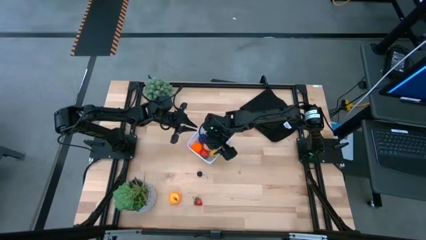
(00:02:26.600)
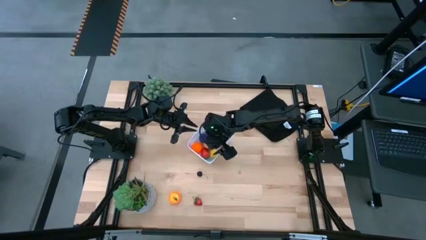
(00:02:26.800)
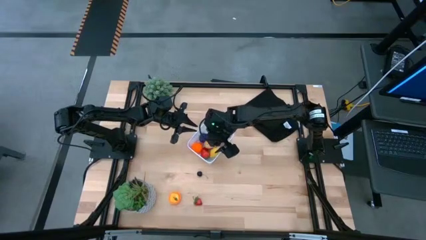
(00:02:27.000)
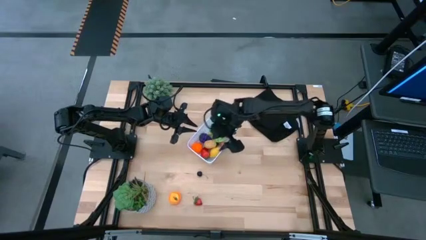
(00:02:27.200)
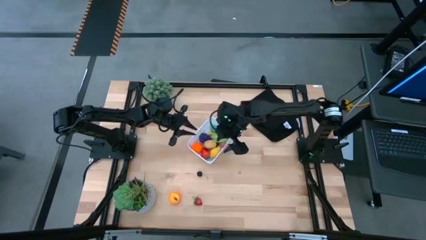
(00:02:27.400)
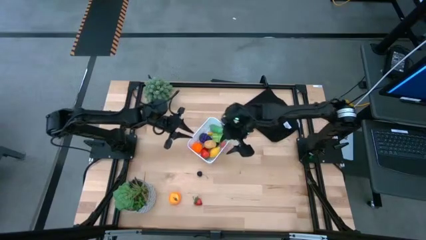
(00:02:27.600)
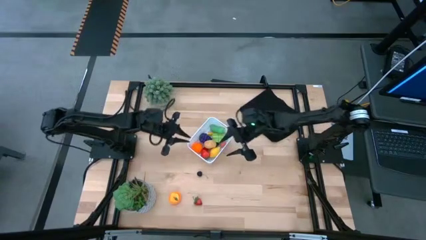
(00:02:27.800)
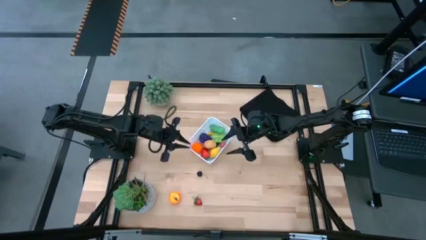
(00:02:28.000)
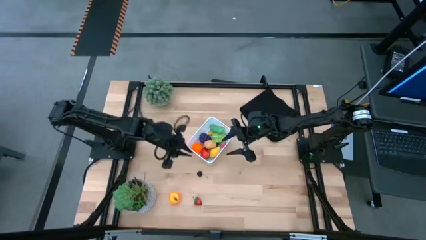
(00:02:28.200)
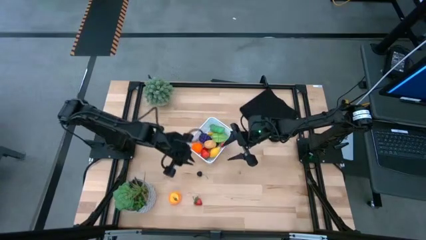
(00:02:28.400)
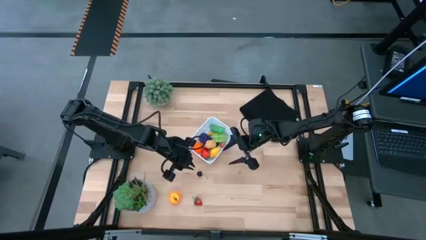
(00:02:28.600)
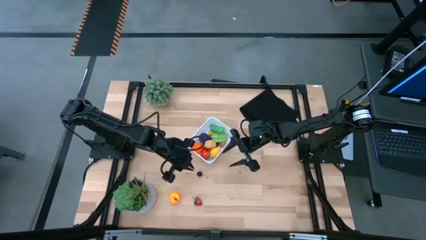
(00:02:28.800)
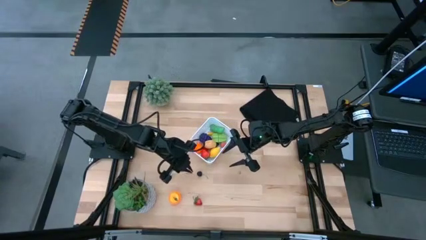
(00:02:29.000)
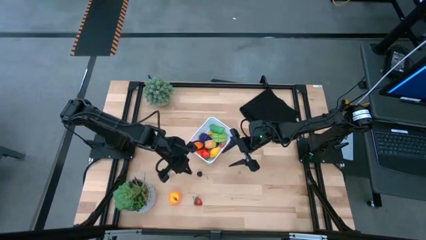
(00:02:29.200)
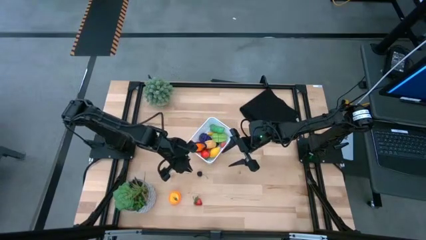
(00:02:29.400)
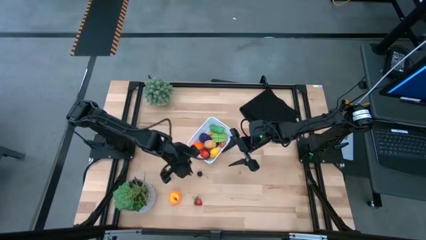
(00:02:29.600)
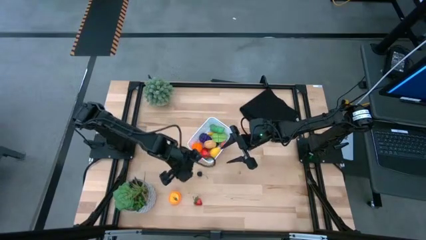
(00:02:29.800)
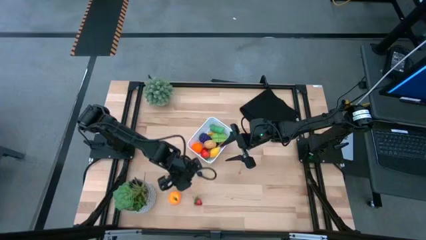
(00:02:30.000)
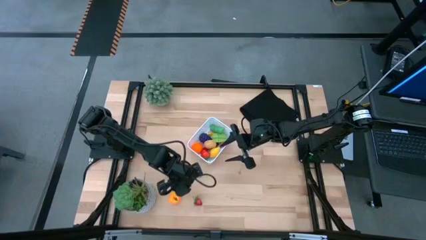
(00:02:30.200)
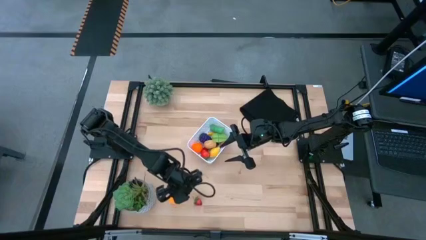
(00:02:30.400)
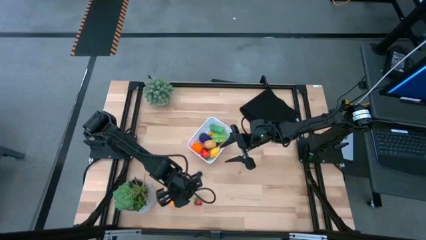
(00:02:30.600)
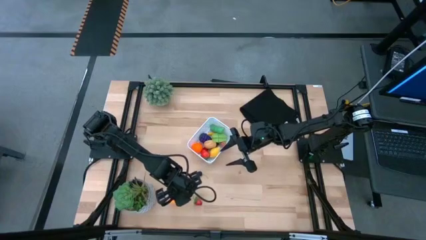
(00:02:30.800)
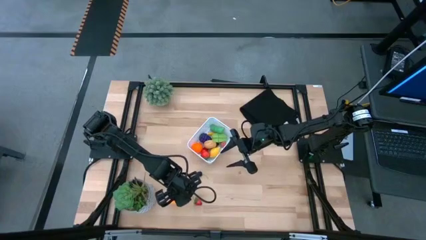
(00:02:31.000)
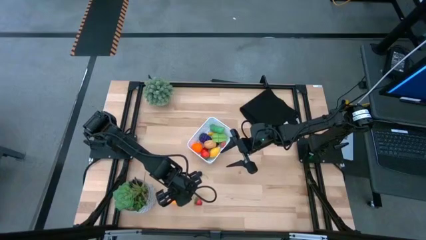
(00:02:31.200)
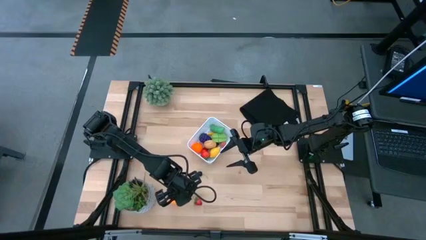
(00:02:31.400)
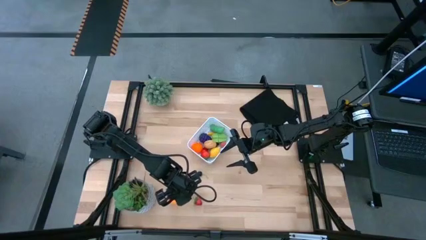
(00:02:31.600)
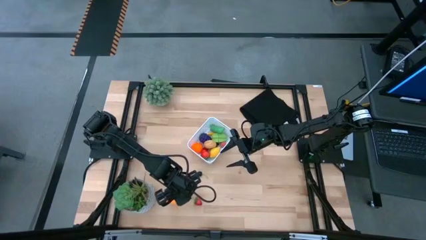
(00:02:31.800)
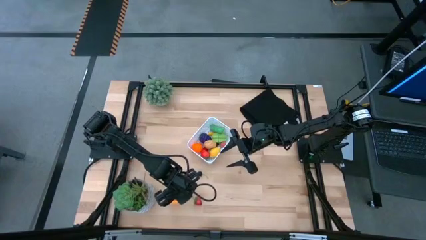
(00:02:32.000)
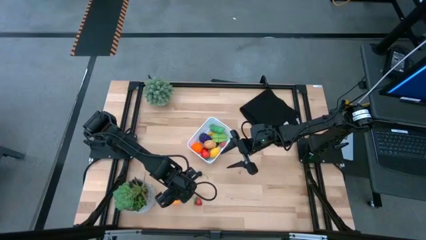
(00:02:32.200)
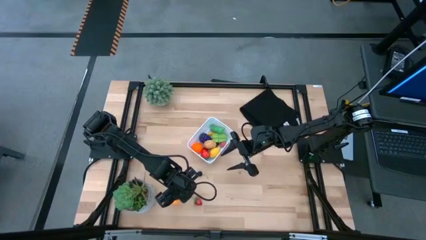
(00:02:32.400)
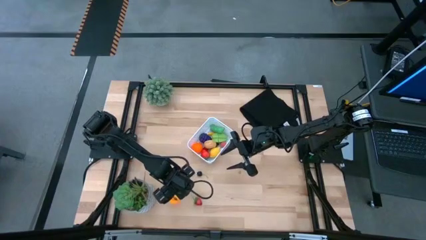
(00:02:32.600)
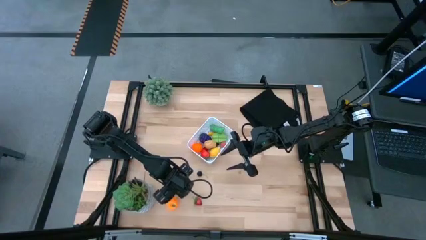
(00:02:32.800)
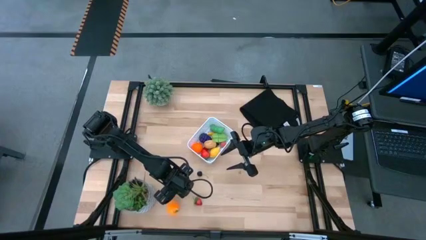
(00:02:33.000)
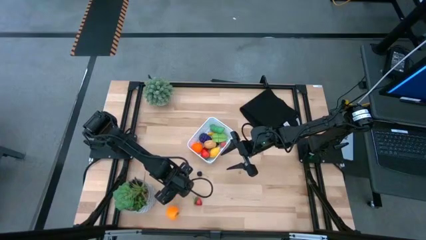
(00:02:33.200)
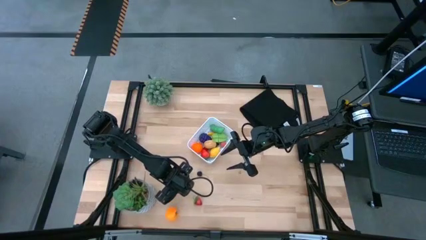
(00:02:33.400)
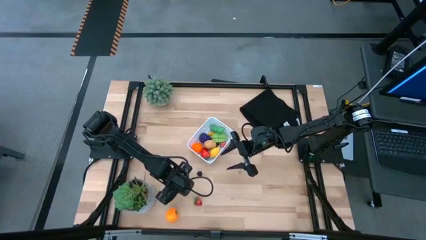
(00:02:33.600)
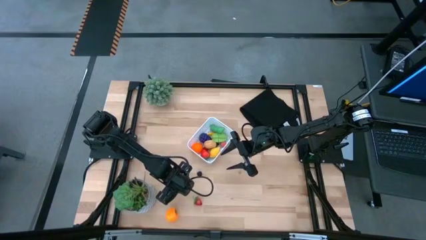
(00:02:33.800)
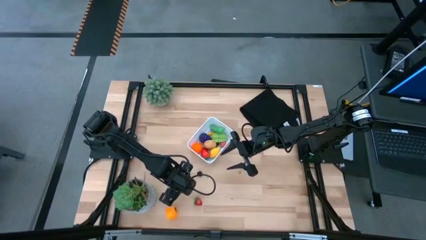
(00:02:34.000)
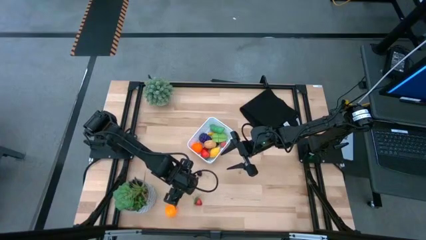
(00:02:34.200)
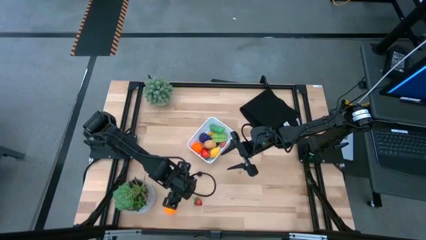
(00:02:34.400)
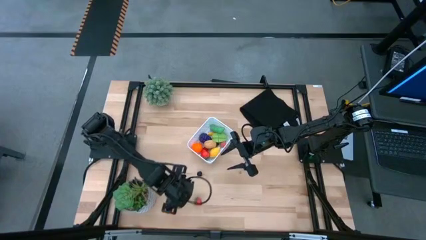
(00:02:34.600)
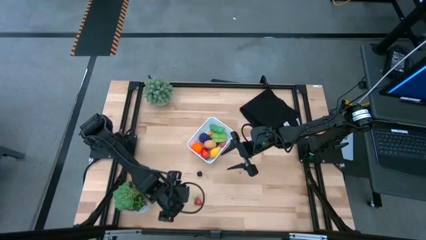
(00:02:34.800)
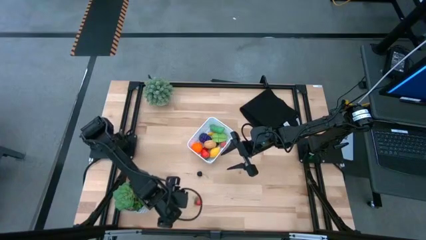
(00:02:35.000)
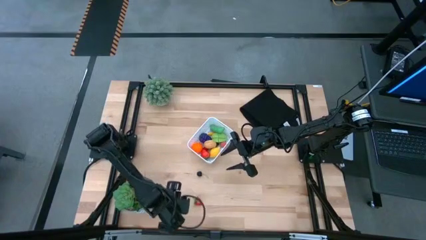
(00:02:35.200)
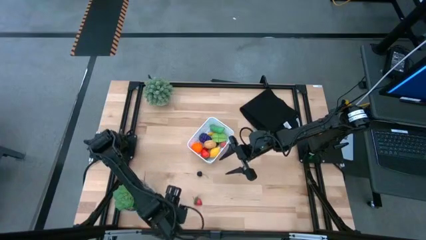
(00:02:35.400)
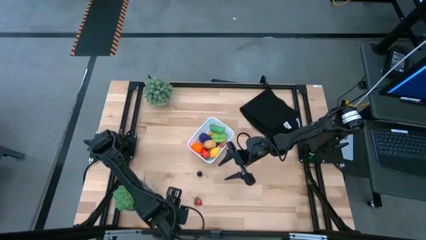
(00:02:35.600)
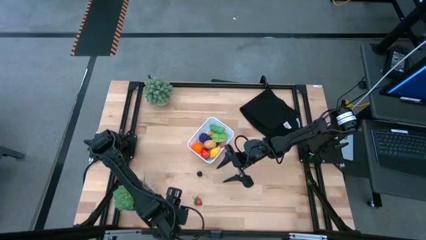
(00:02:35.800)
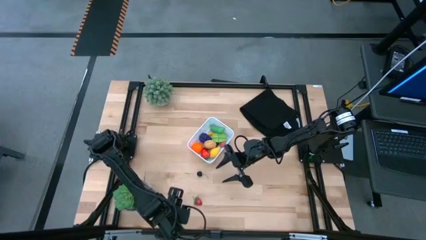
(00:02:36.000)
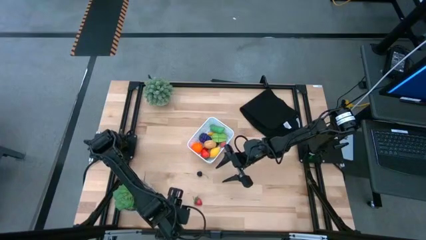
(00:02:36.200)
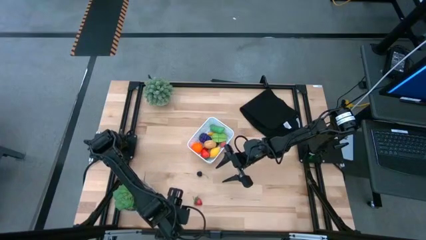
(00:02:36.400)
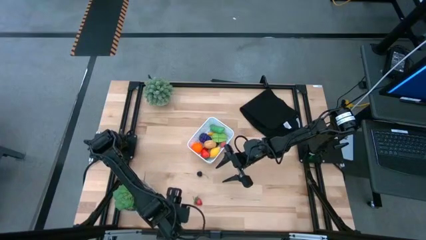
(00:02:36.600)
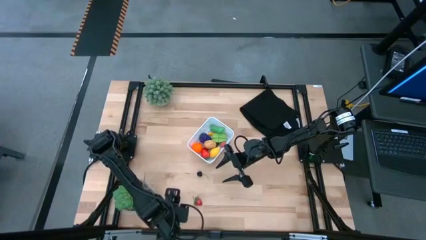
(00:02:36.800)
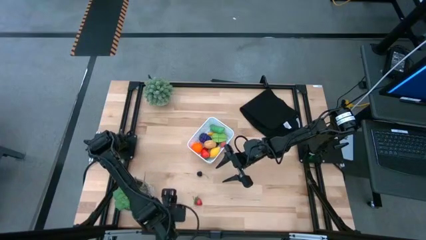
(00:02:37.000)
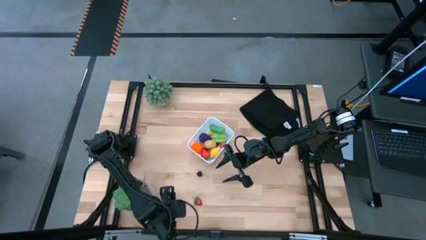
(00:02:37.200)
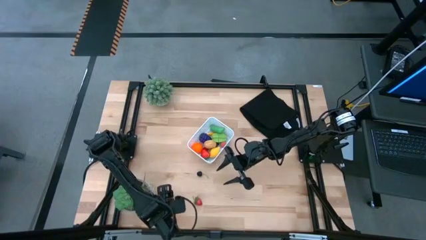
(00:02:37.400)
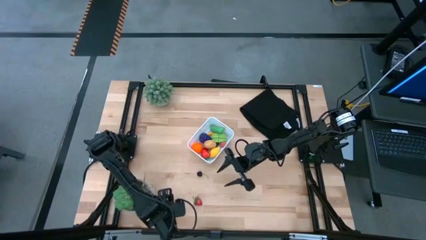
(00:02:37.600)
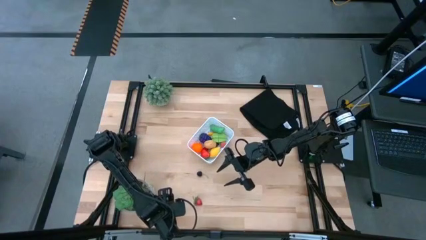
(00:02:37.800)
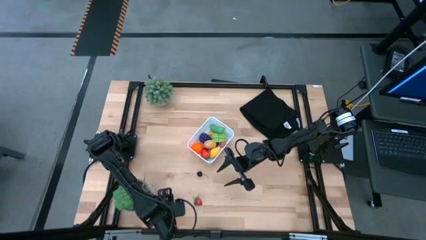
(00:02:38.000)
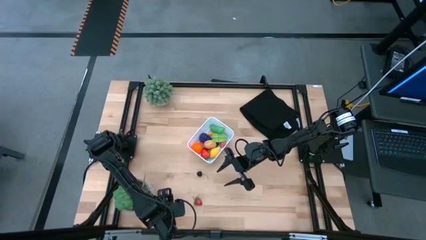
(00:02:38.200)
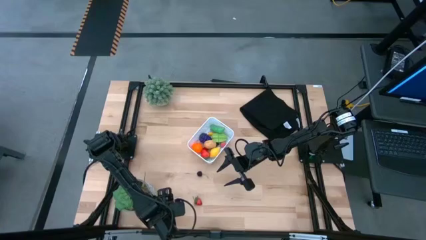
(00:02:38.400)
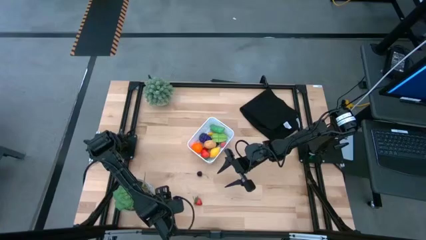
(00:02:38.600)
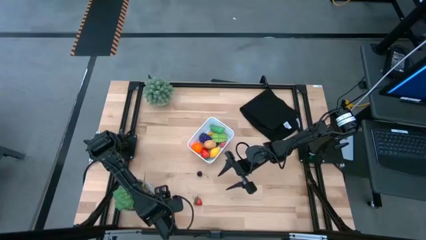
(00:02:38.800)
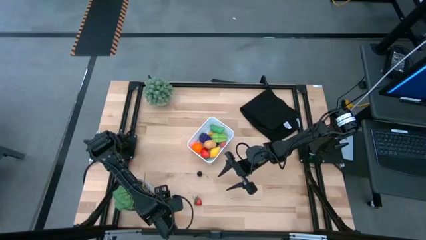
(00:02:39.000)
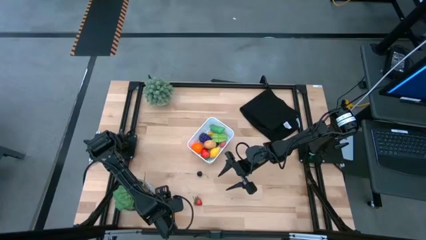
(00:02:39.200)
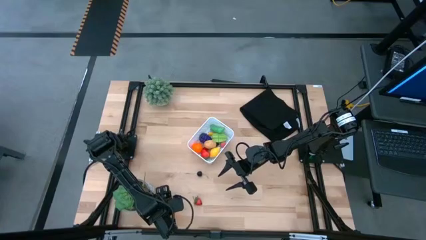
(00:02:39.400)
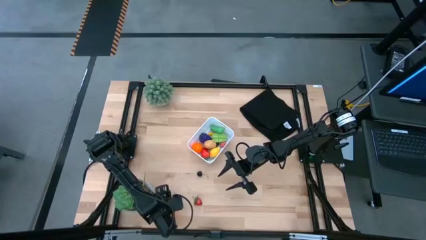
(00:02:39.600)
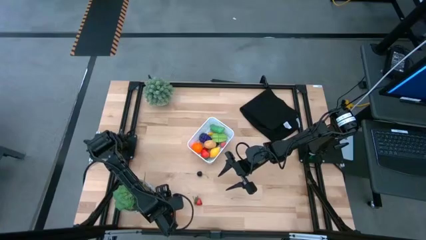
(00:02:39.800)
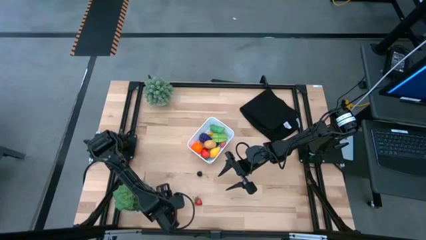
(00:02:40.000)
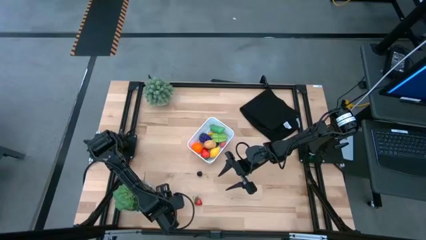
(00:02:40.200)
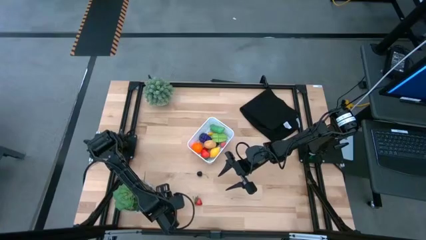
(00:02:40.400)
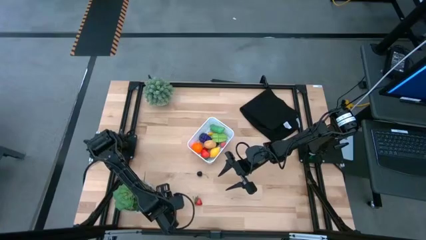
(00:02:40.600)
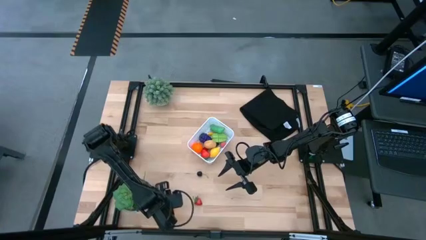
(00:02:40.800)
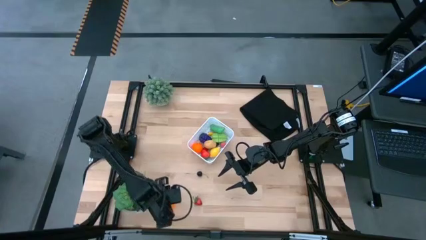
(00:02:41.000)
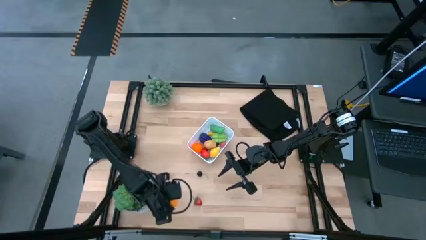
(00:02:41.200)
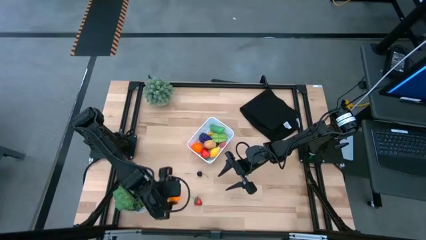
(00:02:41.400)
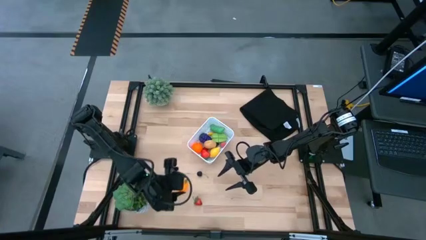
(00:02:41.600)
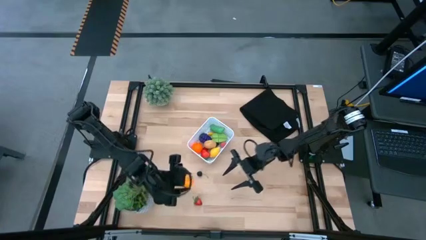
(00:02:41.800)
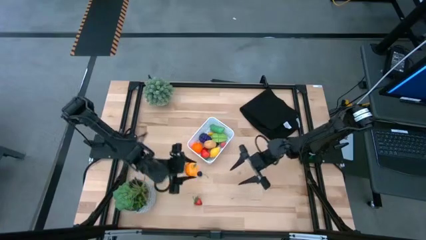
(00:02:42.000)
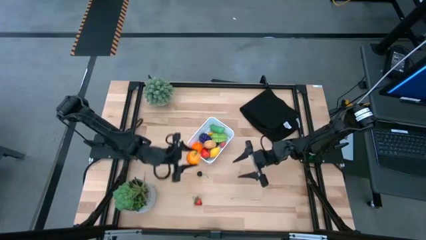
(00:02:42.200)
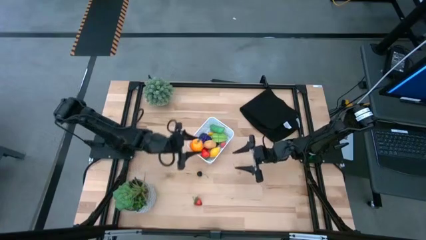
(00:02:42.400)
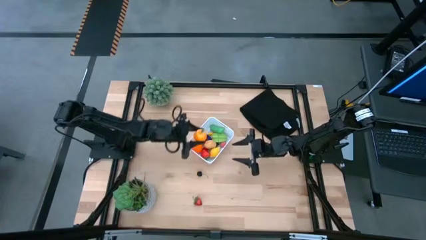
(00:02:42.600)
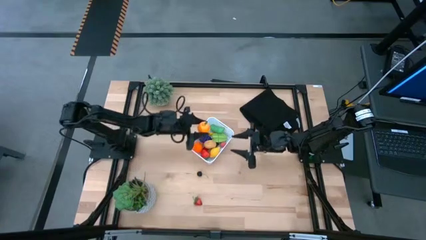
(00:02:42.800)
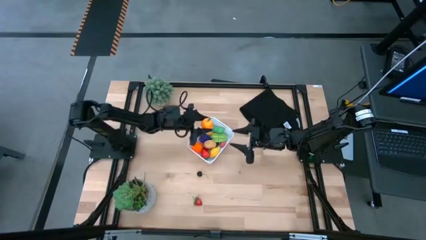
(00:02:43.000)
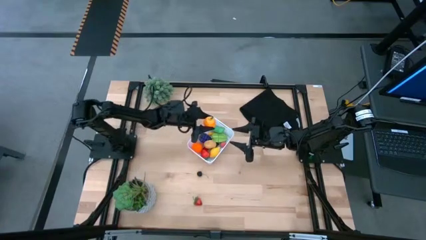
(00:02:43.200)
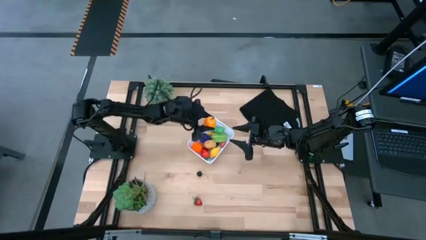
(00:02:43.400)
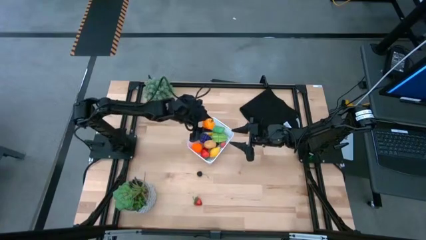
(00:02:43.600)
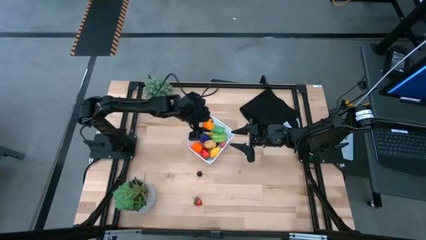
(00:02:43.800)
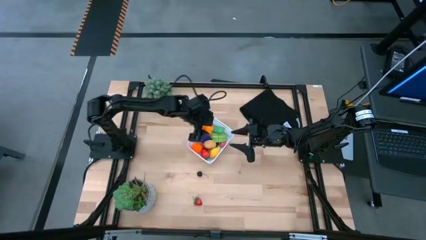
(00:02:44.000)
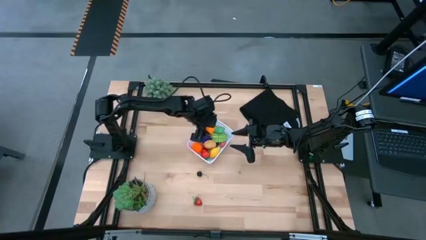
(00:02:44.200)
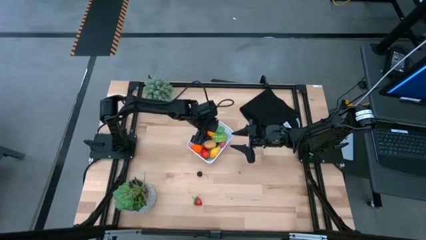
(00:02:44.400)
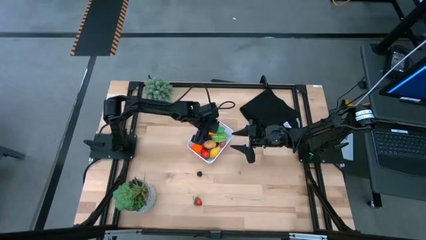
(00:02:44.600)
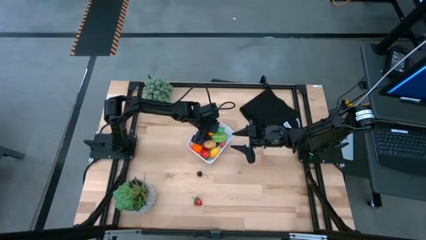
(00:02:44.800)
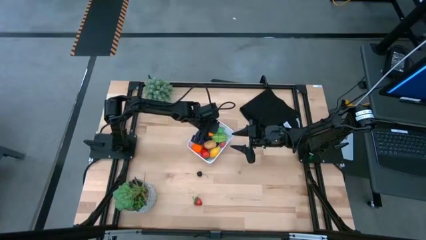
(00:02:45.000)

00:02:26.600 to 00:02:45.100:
Task: Pick and placing Produce into tupperware
Put the orange into the white bin
